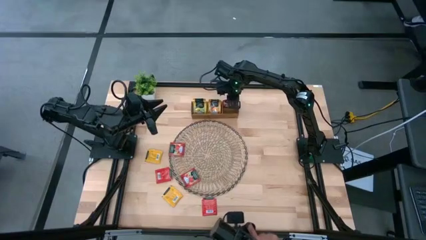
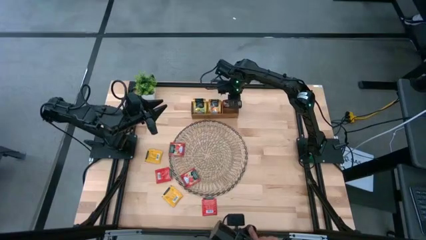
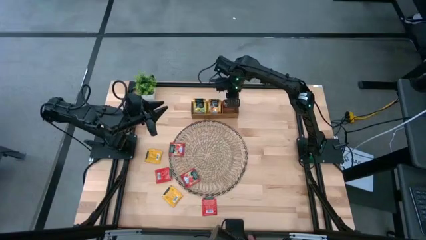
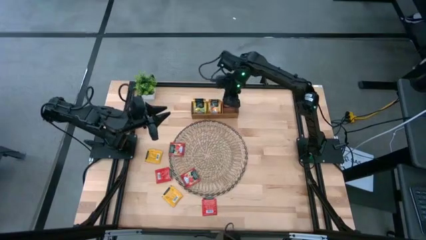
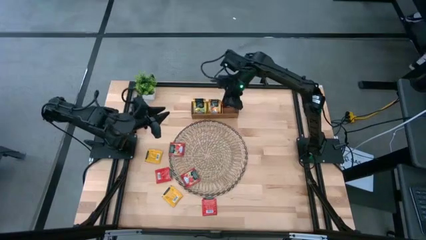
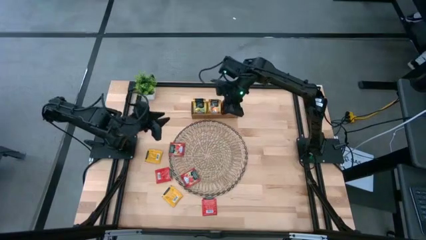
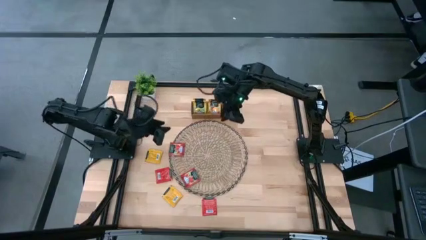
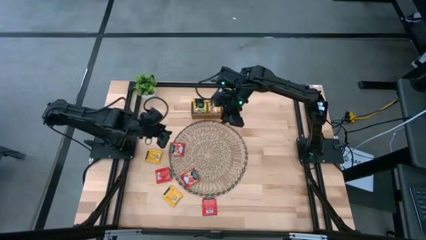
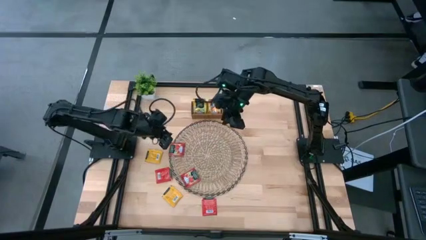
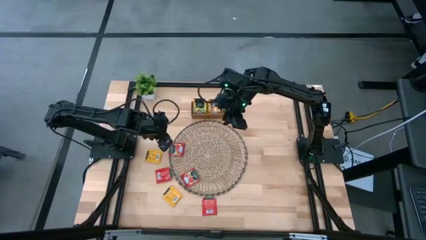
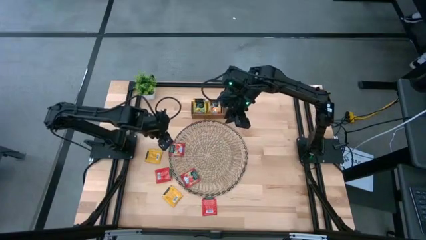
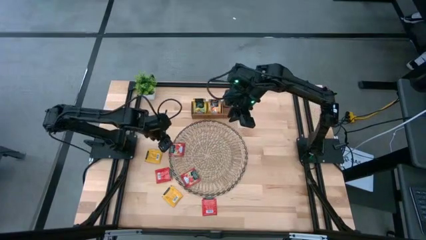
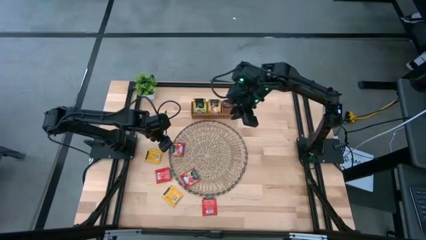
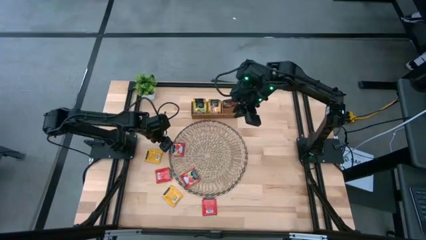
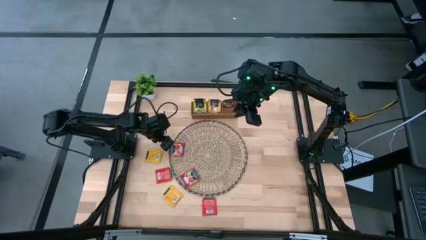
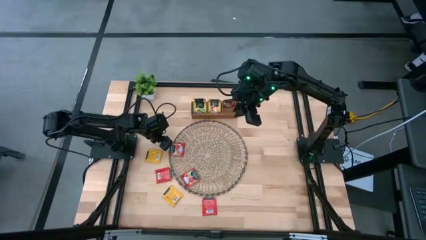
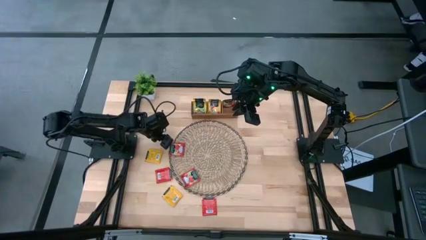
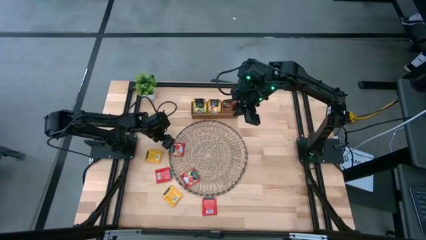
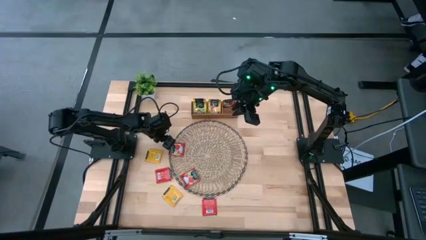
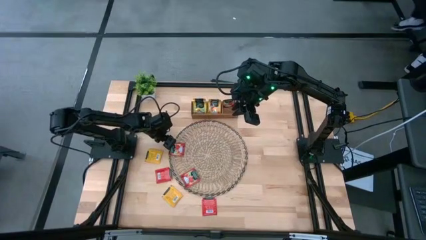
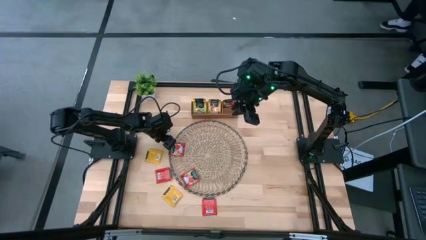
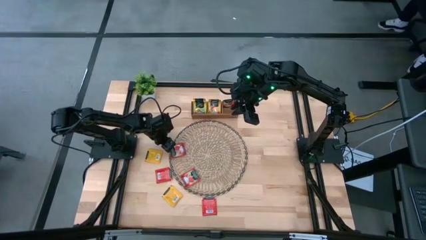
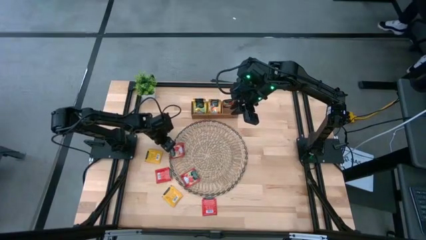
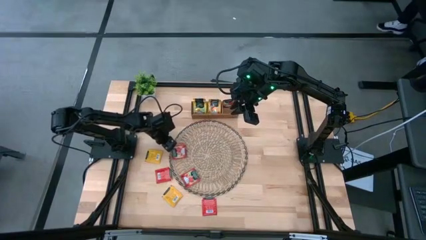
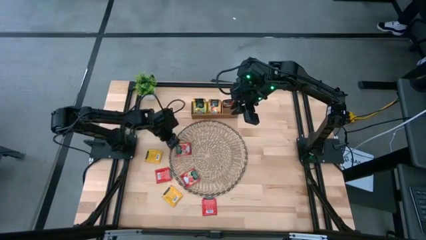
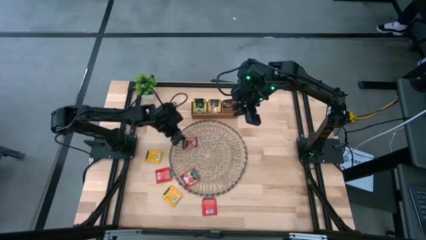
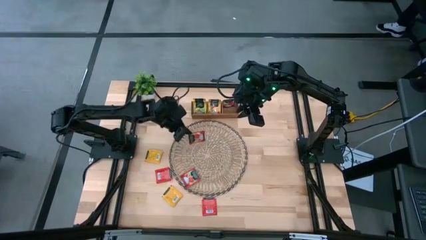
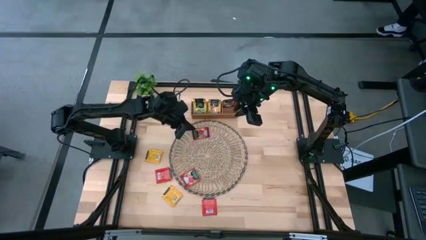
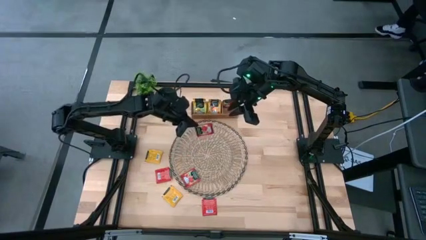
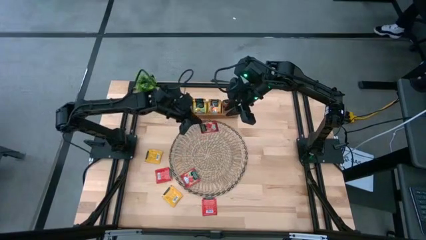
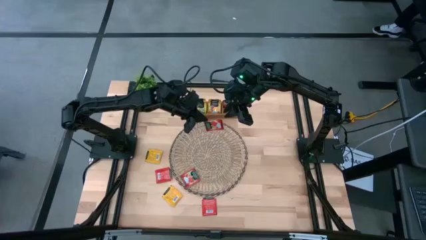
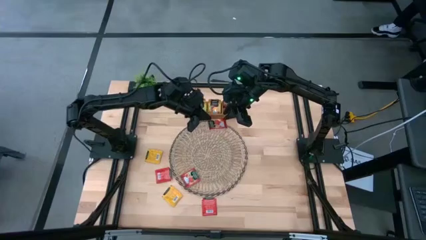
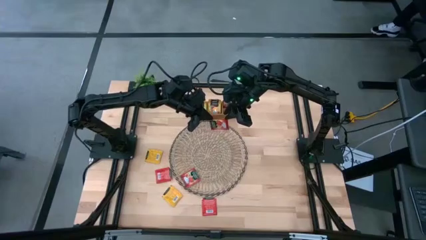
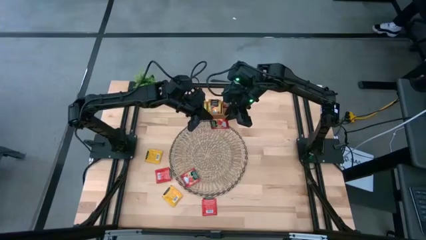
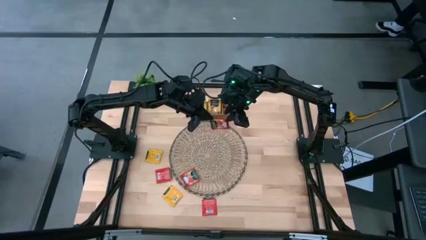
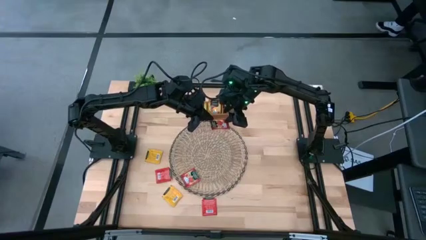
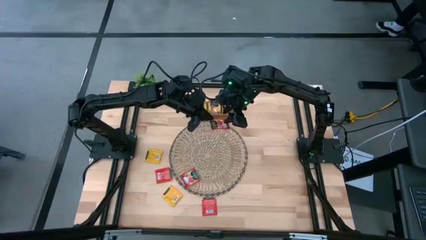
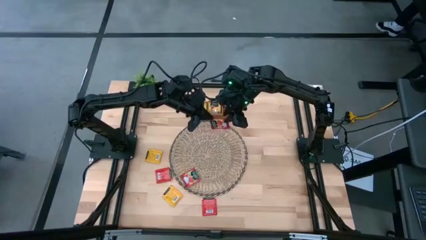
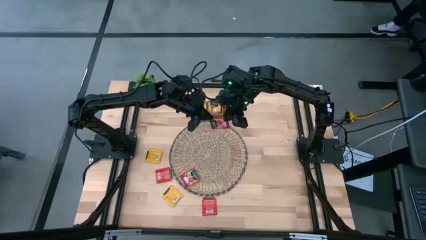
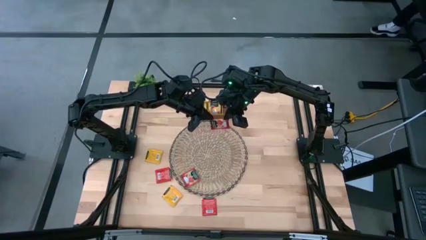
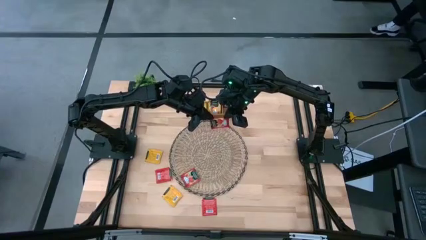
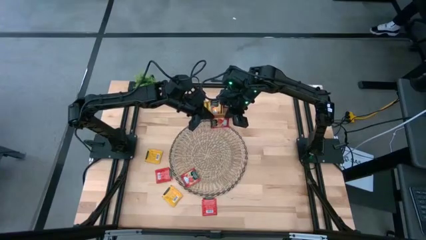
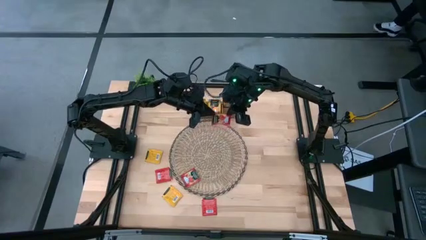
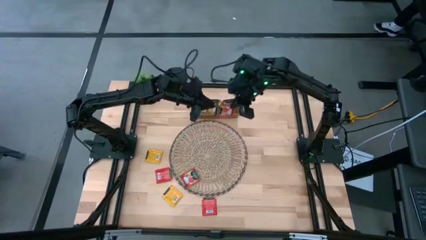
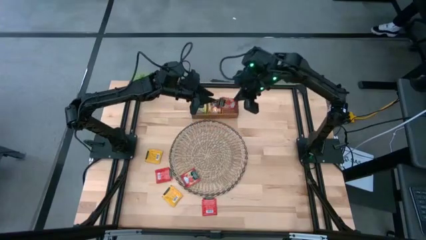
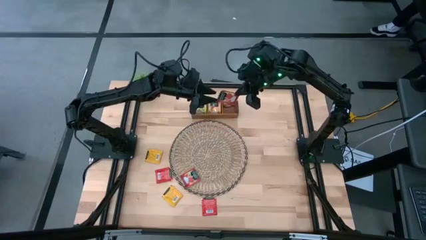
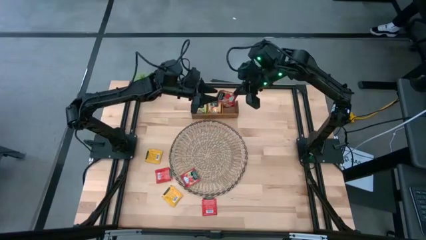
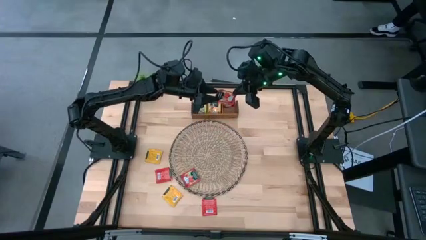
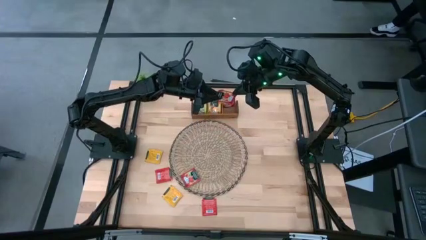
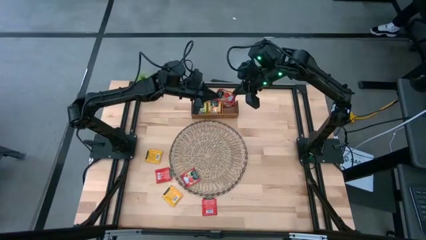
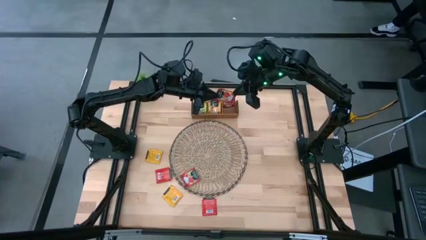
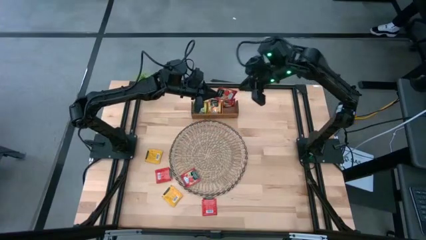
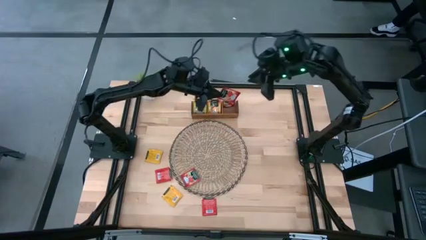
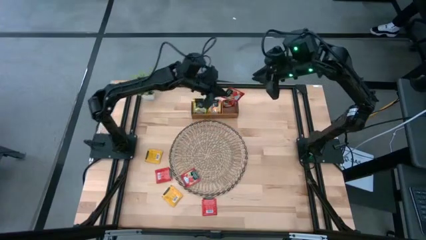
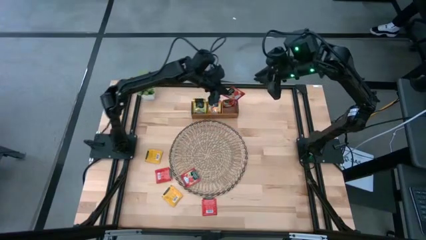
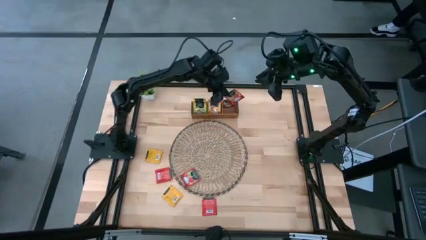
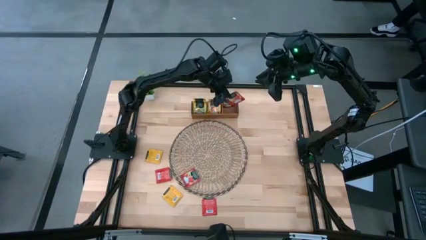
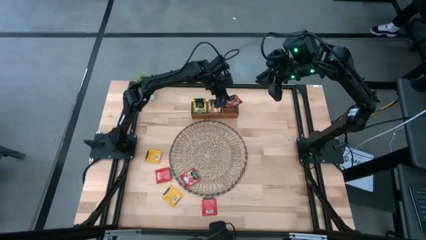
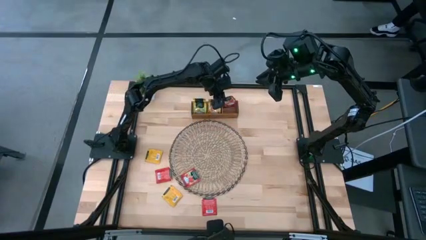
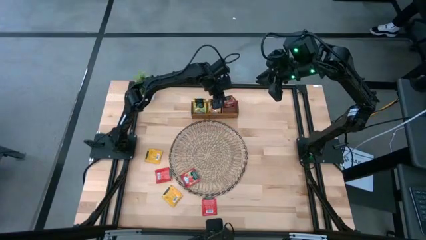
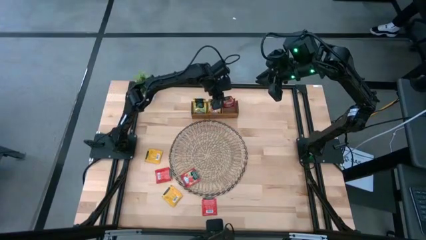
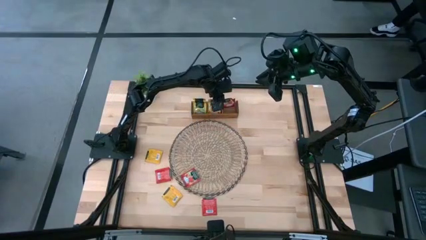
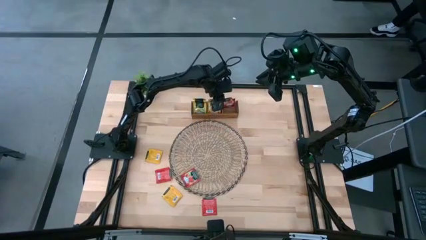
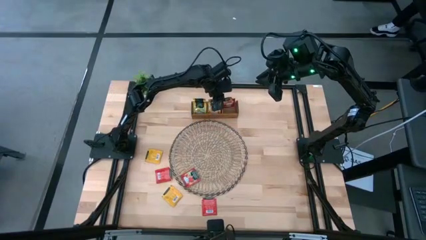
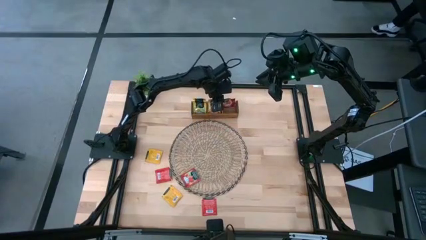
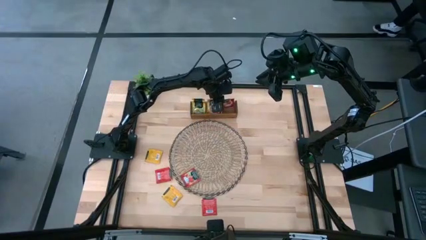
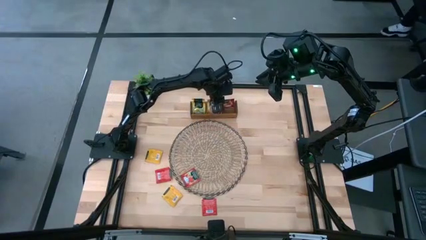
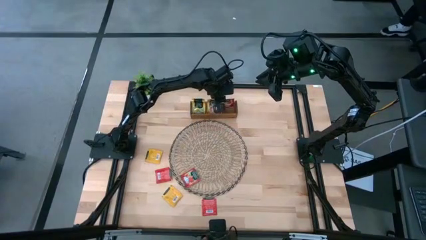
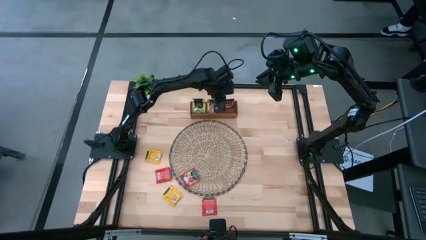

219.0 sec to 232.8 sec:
Task: Pick & Place Tea
Put the red tea bag into the right of the wooden organizer
